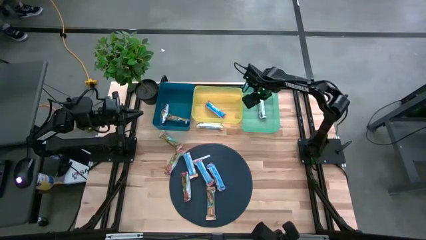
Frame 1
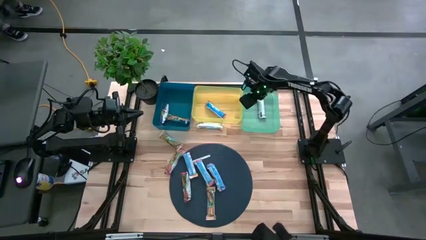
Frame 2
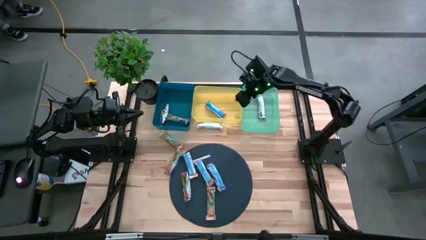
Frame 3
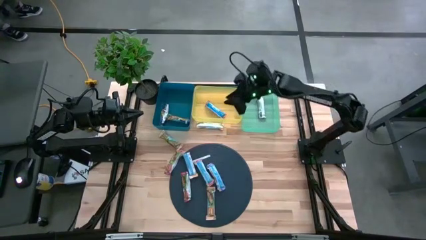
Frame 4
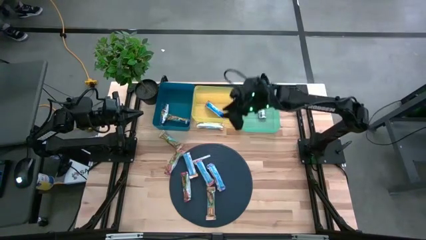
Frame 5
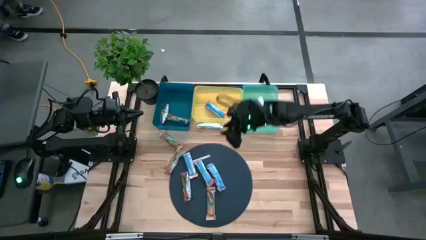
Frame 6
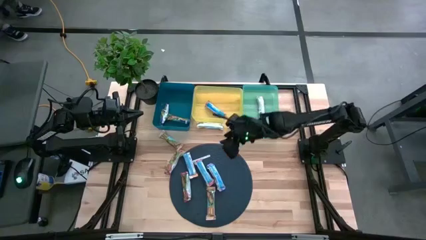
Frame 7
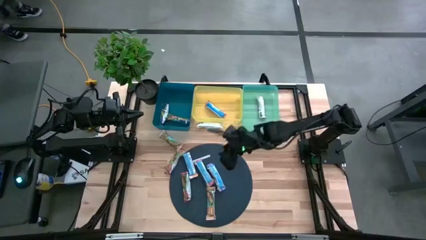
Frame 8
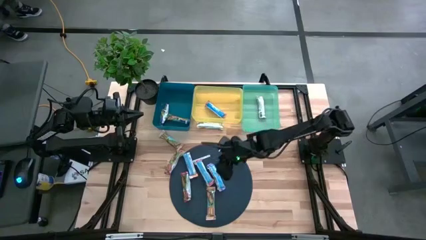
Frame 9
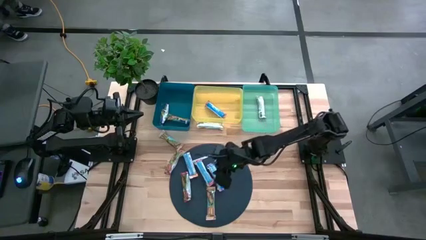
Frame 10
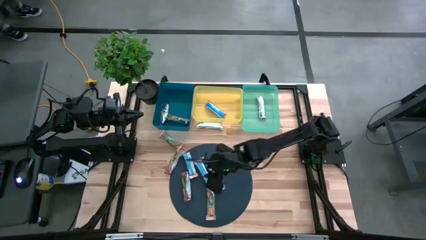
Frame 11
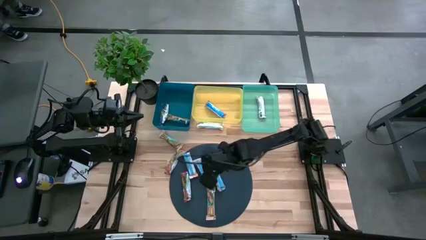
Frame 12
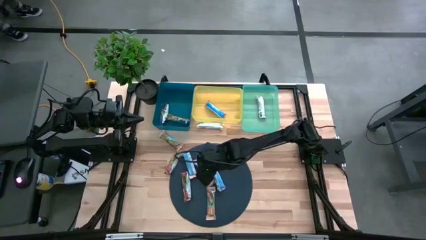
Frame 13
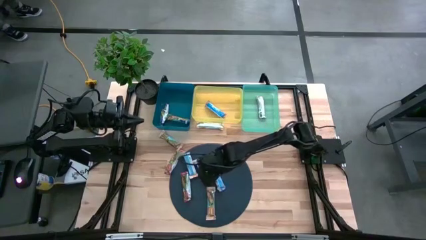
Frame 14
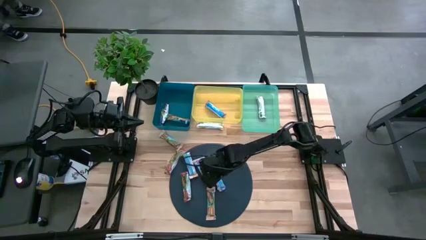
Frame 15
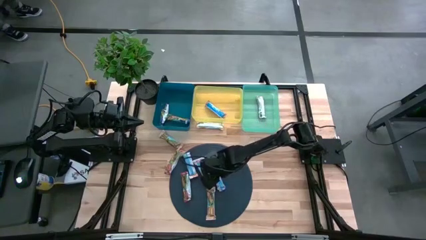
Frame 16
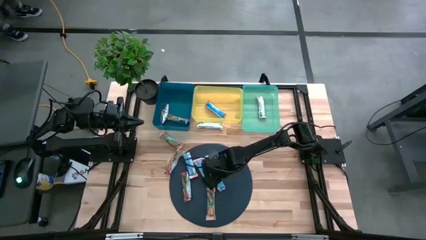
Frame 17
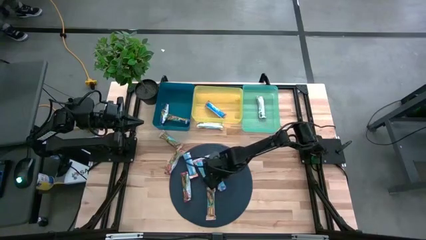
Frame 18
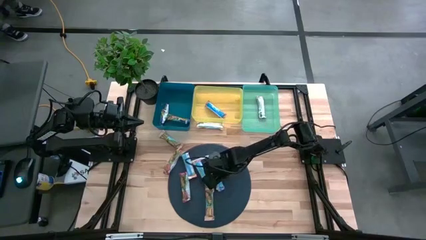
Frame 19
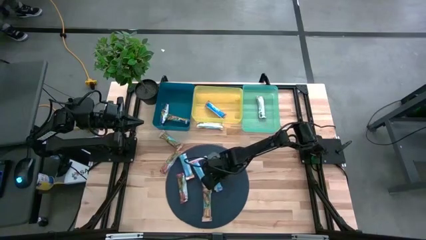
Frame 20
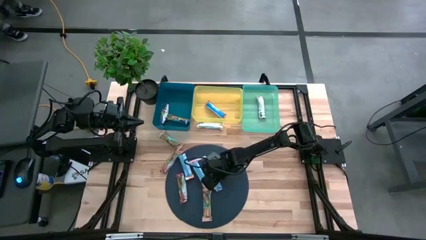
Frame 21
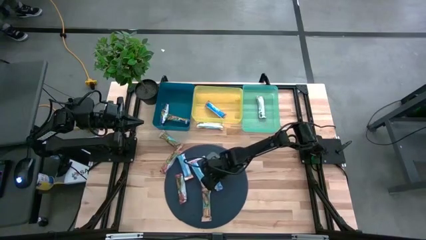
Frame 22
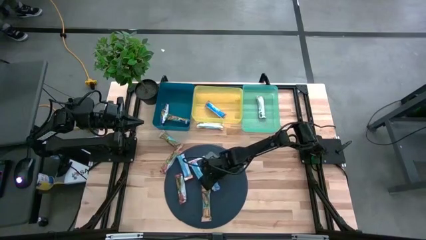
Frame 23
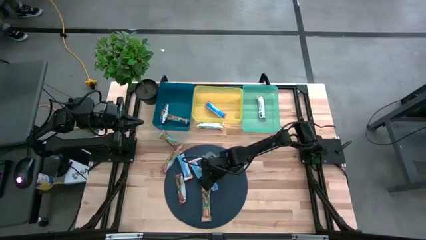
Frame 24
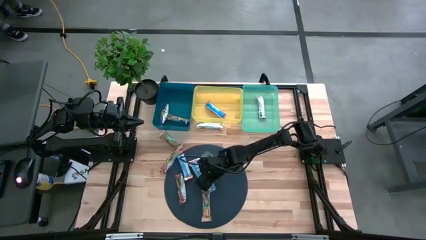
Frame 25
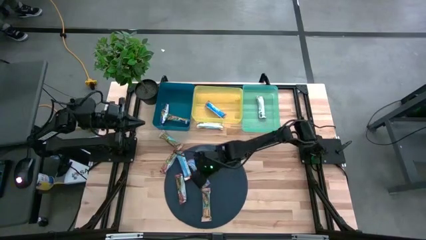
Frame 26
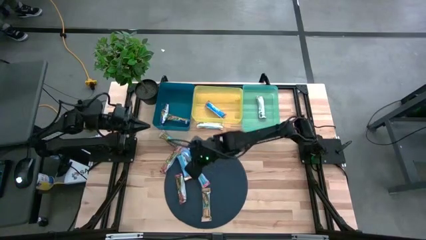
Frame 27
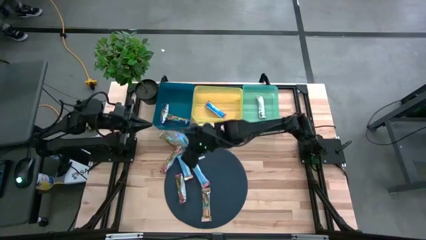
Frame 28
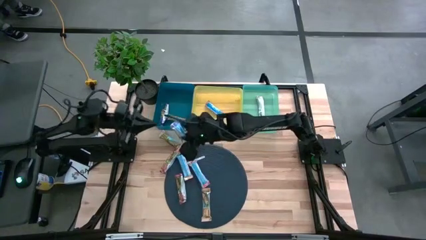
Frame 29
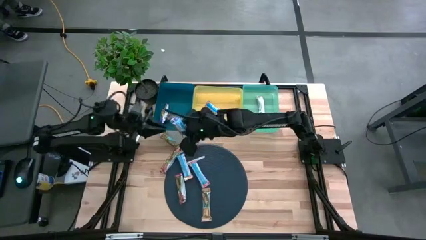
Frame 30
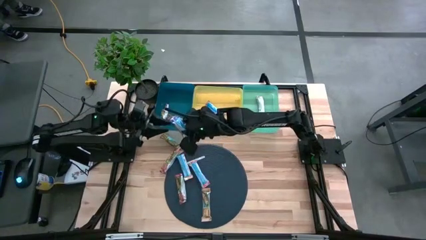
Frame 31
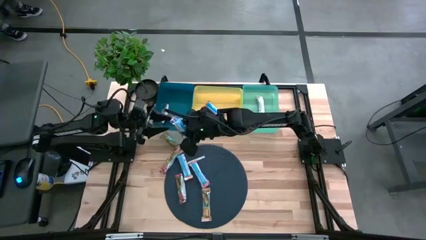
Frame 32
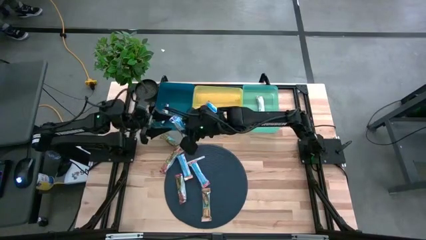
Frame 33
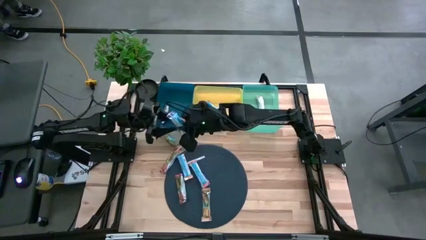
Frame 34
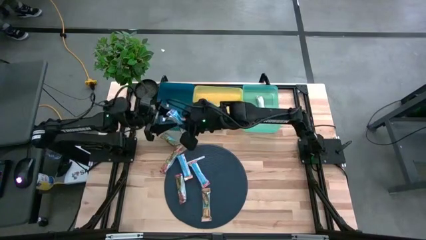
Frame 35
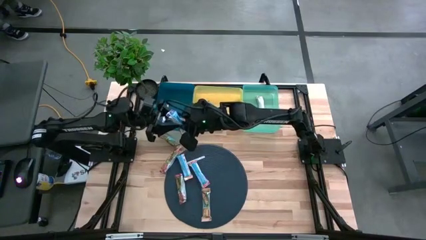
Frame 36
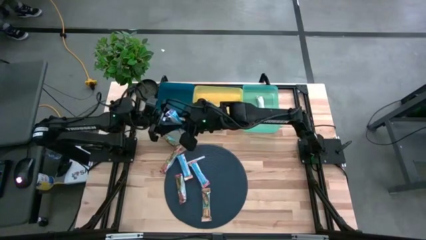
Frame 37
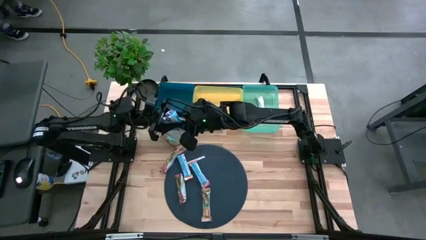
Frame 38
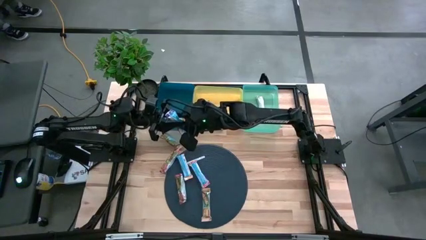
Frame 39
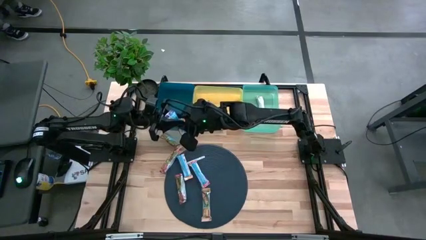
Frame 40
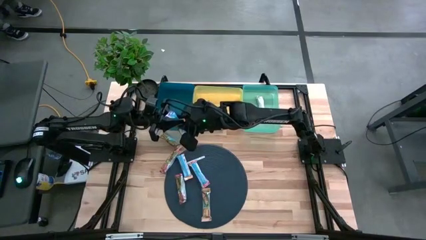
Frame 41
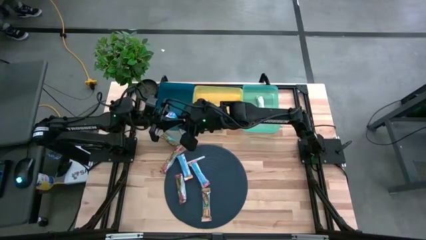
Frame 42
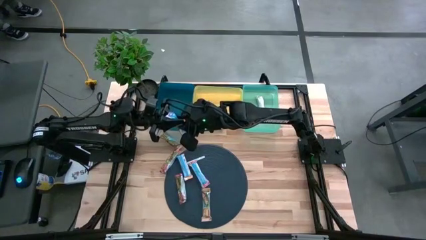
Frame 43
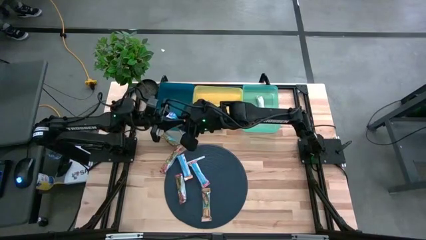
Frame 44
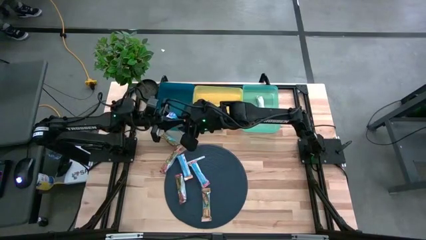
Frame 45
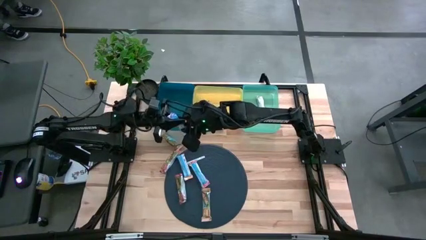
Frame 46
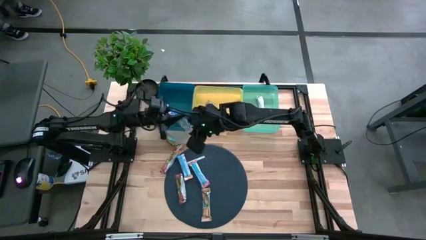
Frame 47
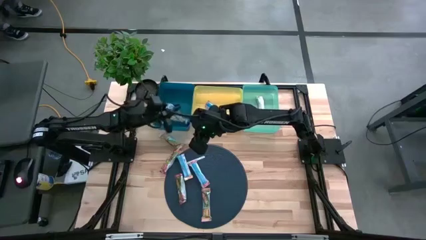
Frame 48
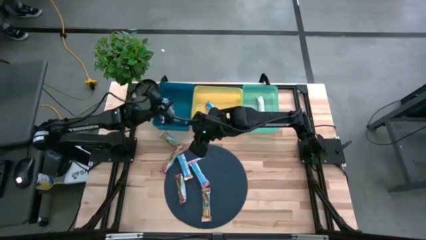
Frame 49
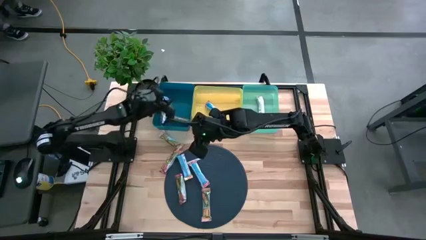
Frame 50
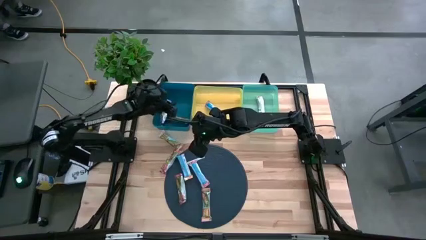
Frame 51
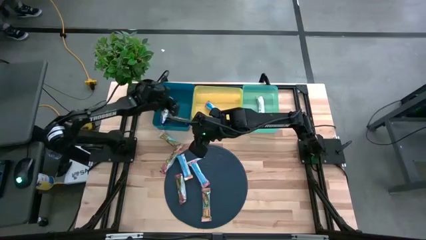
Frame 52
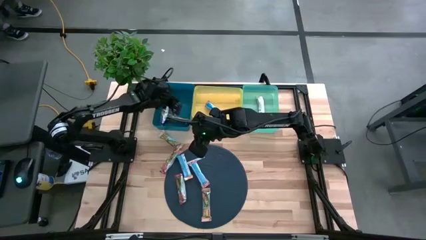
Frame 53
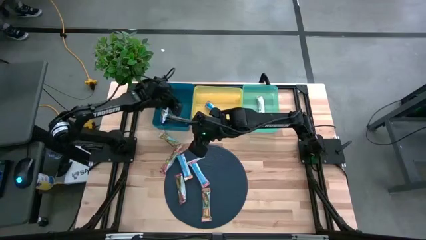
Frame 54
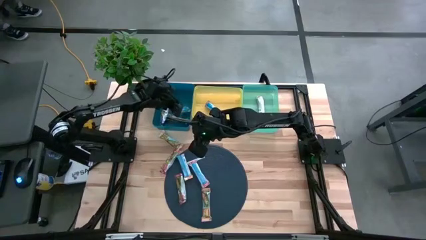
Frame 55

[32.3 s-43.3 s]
Task: Pick and place Granola Bars by type
Put the blue granola bar into the blue bin

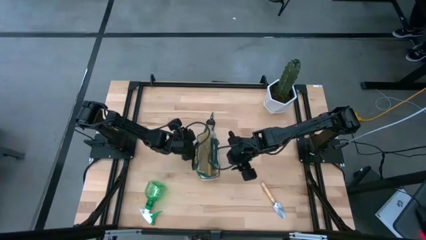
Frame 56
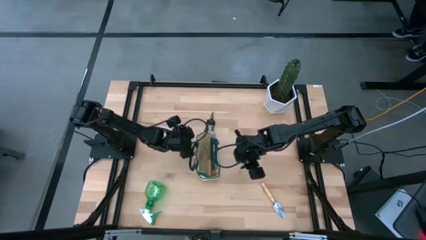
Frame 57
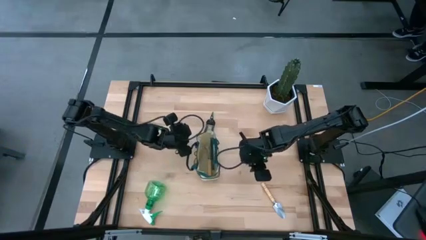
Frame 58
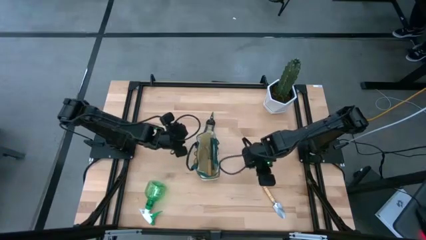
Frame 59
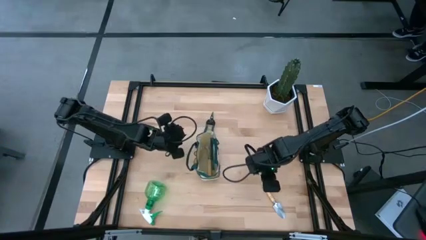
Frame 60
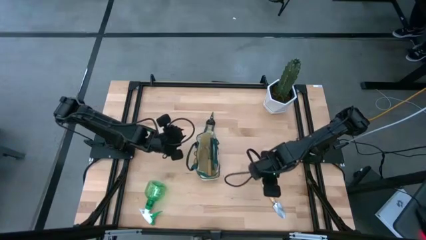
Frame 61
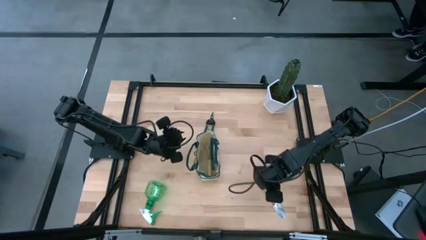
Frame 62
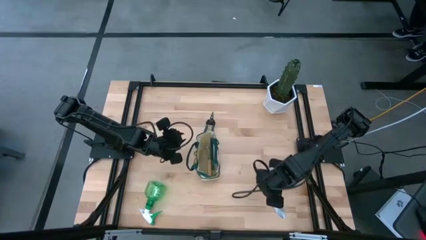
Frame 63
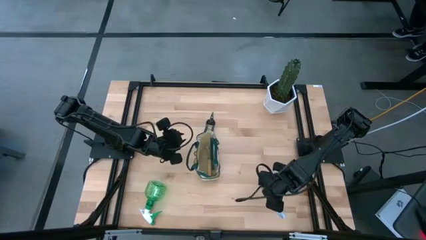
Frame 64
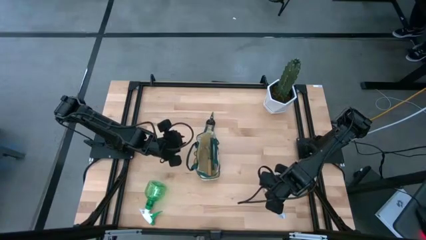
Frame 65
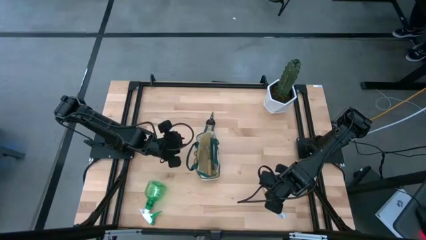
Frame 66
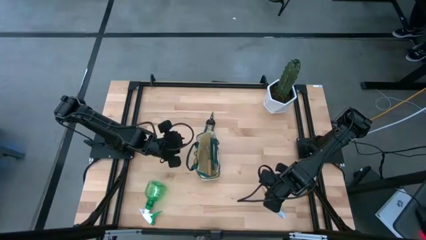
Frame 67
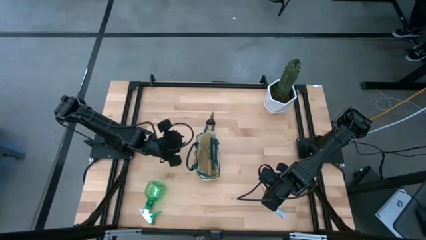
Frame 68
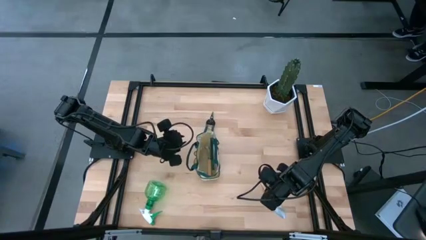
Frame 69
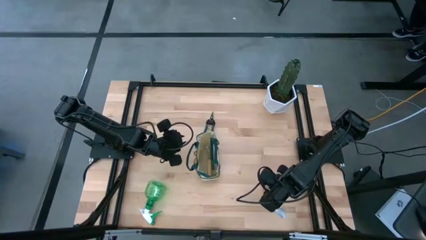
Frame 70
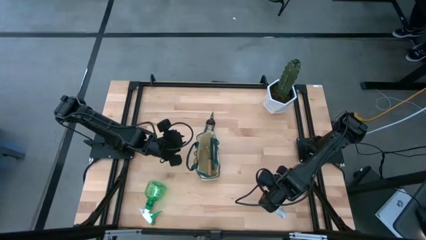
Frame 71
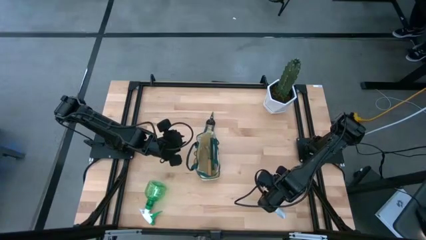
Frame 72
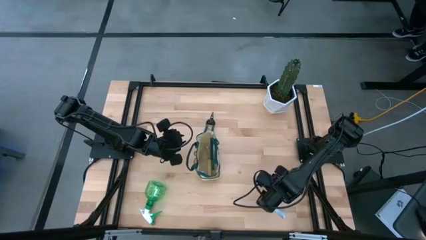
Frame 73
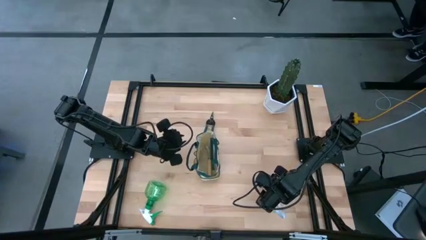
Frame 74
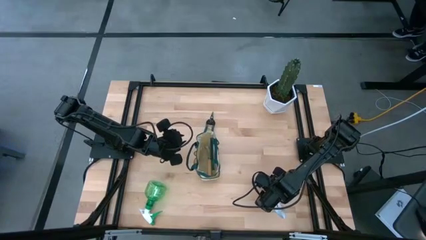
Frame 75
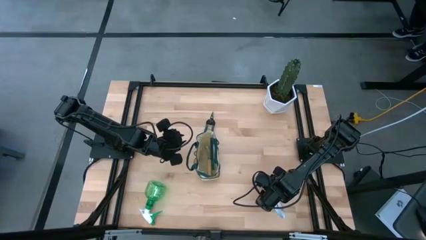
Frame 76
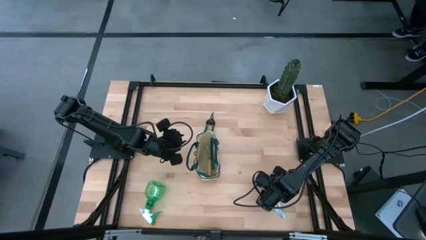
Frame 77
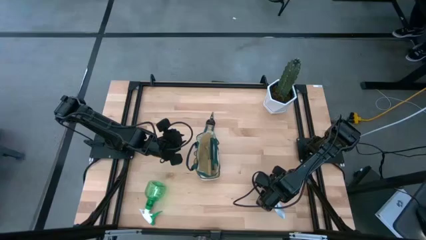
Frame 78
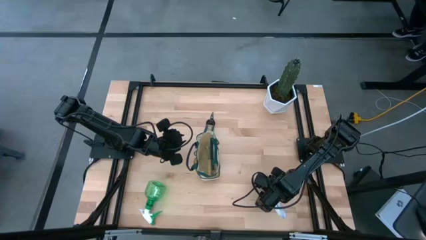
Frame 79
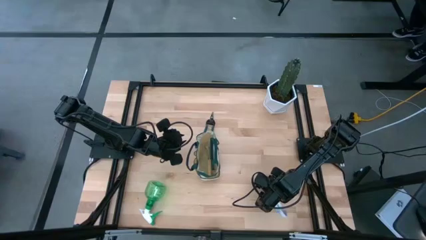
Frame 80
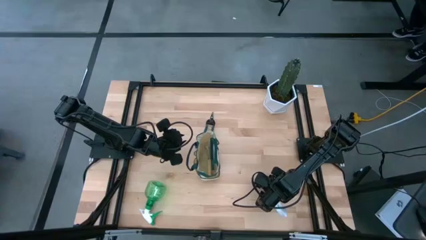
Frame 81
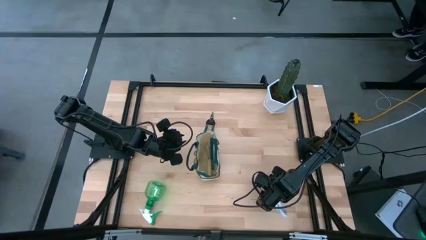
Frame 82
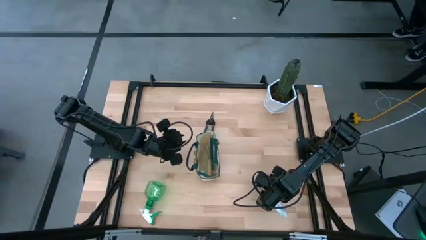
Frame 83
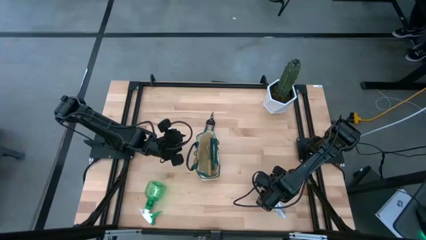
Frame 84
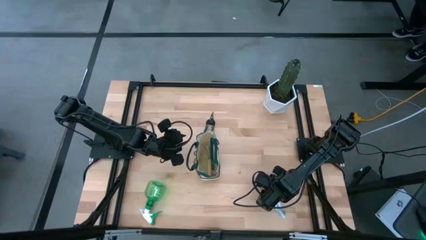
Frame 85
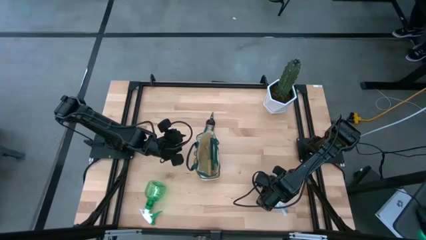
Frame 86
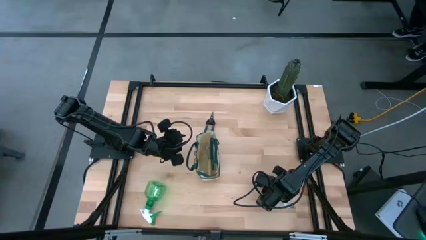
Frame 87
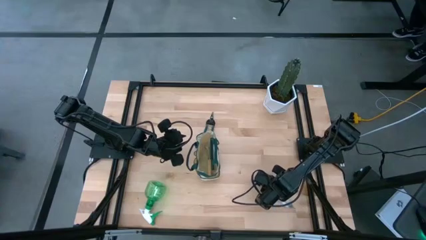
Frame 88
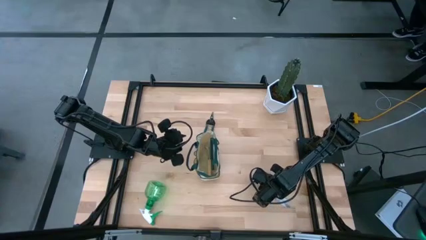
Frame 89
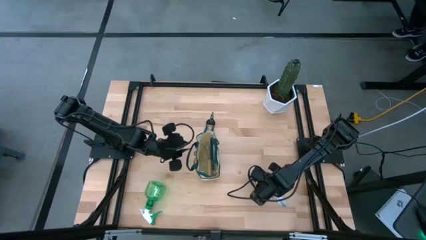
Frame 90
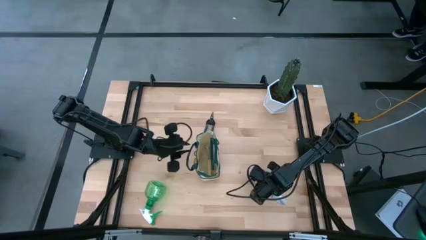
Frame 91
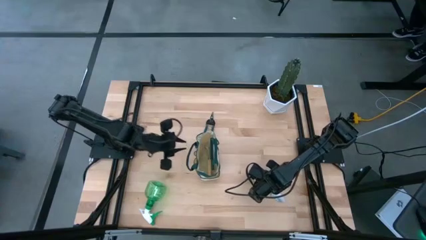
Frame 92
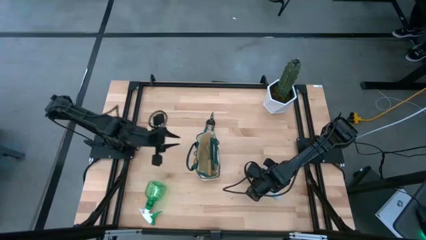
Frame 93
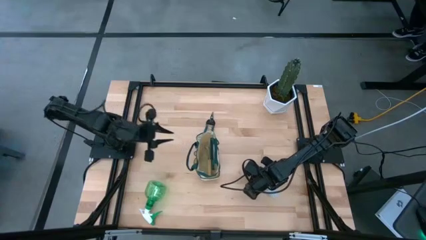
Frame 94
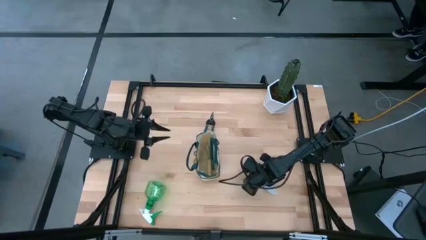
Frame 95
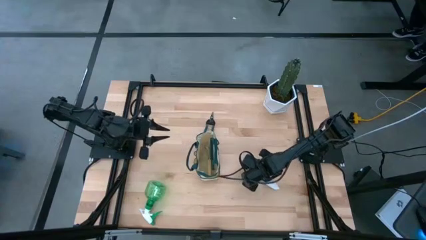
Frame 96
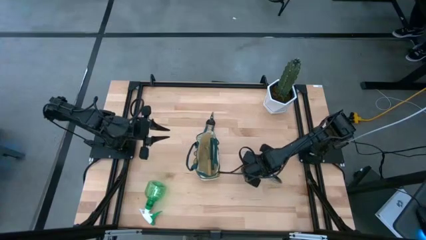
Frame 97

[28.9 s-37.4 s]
Task: Pick & Place Garden tools in Gardening bag
Put the brown trowel into the gardening bag
